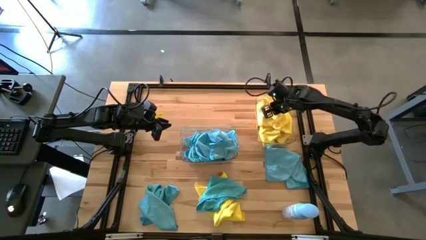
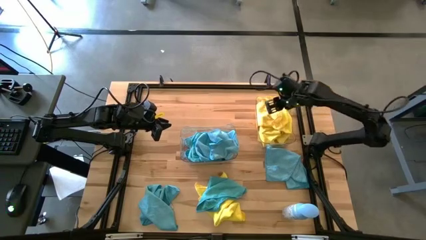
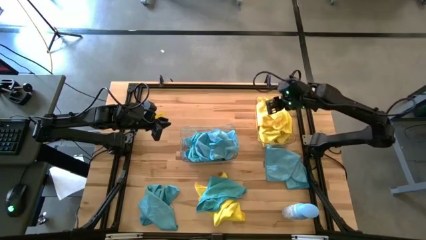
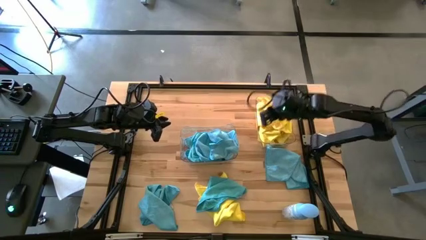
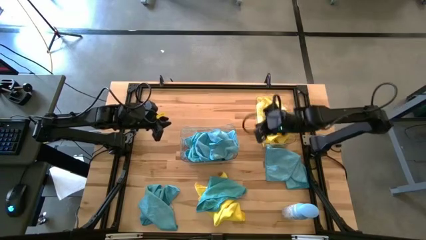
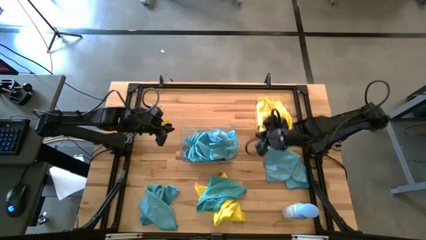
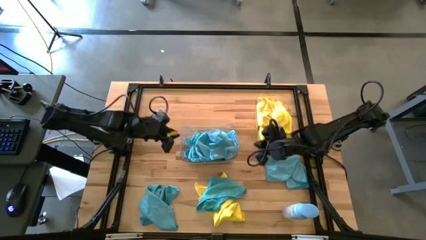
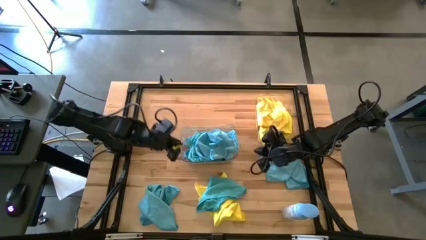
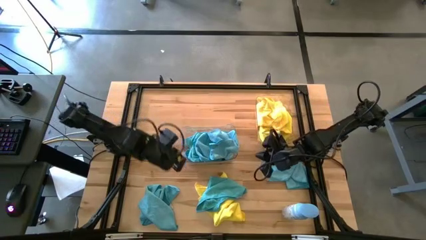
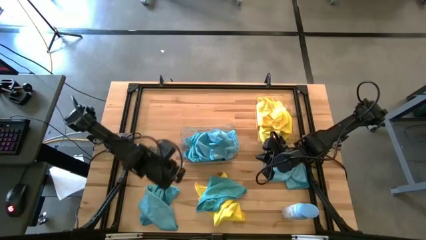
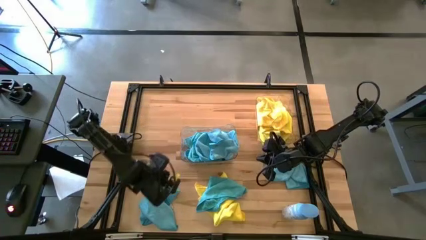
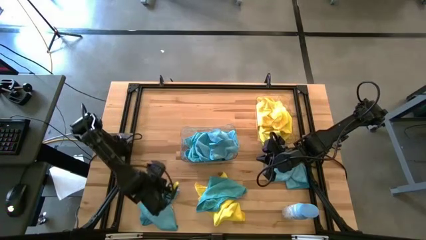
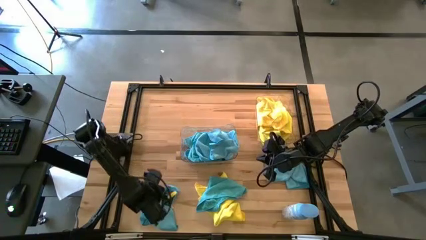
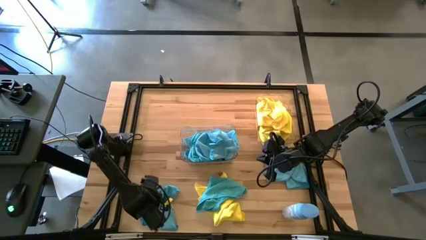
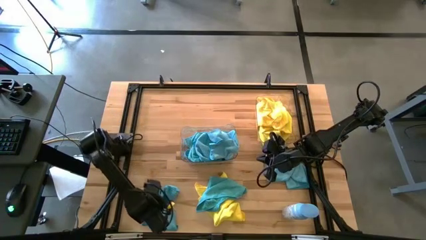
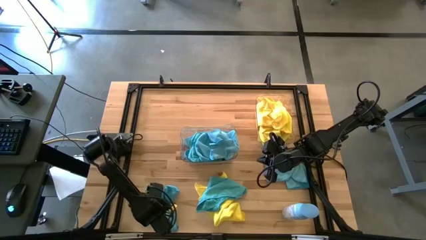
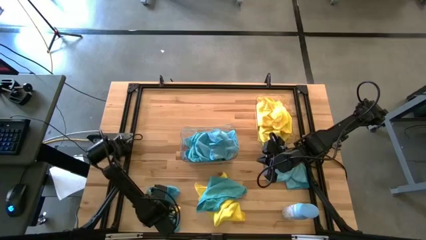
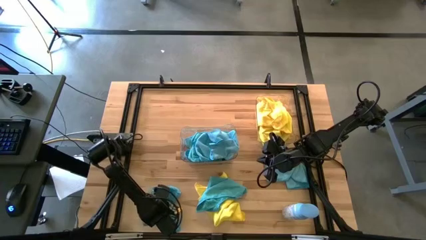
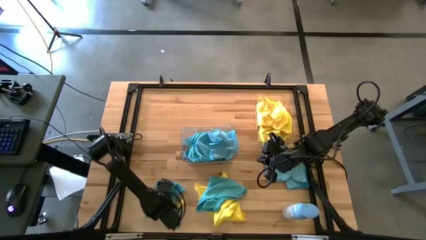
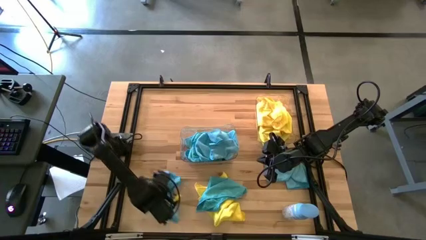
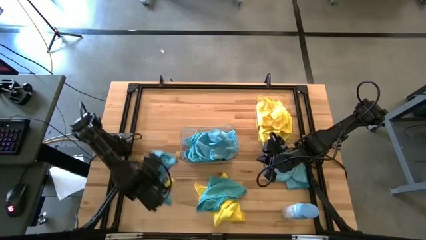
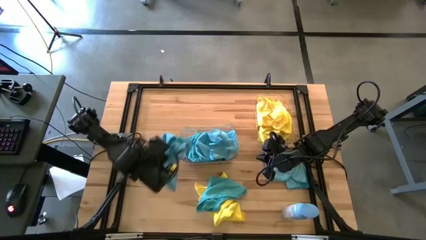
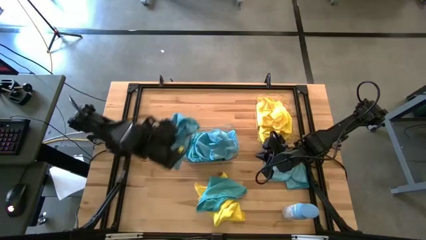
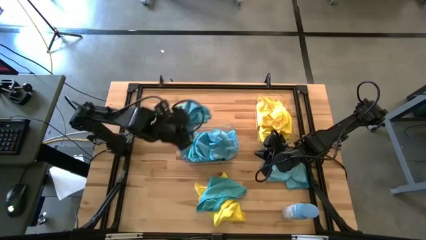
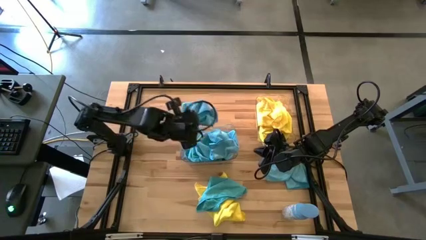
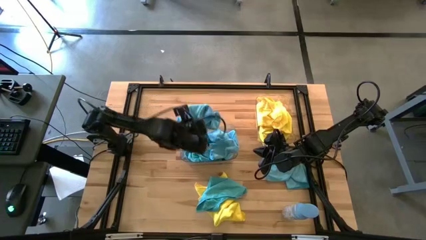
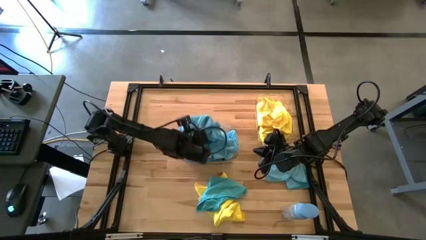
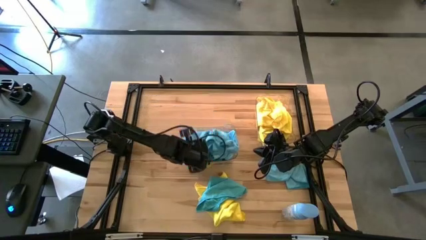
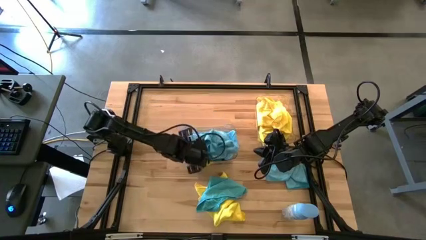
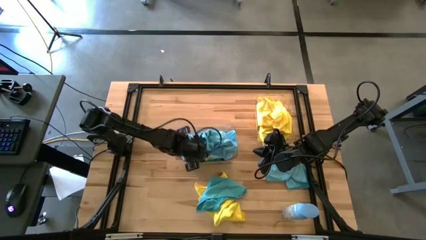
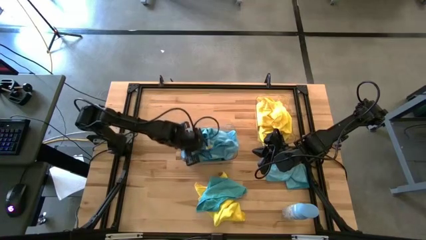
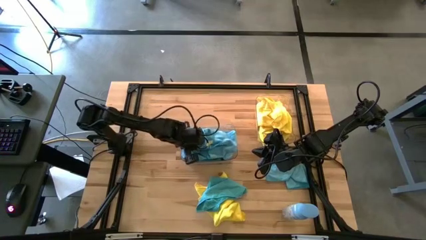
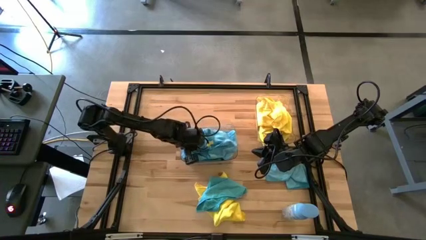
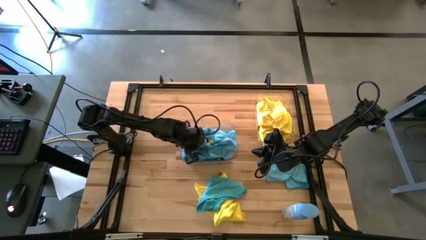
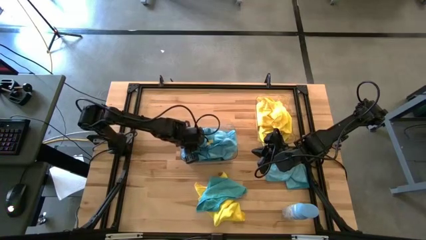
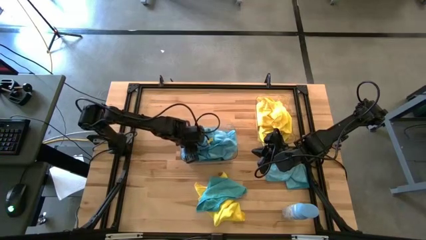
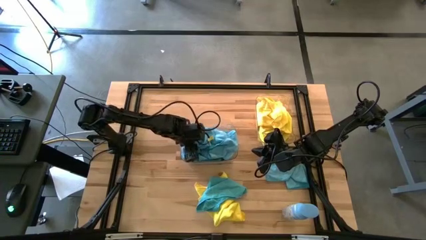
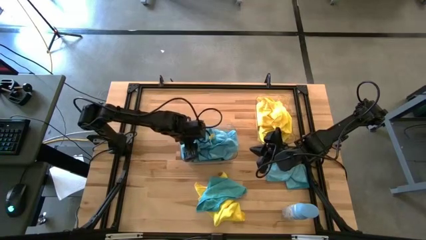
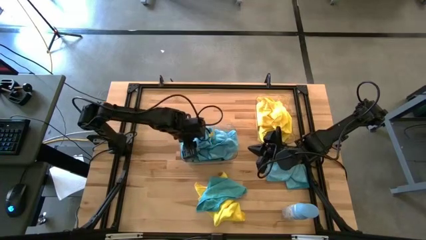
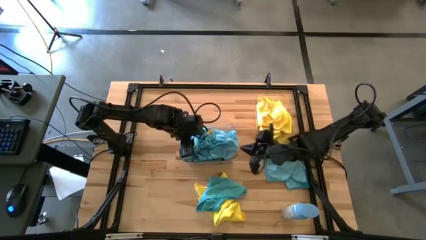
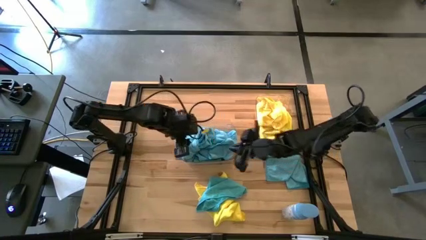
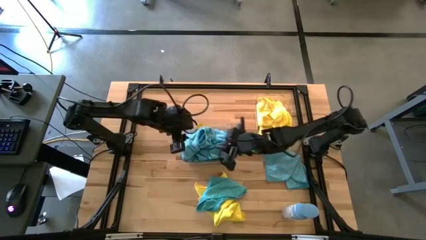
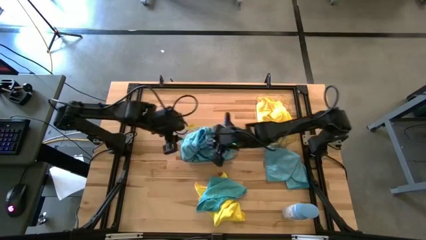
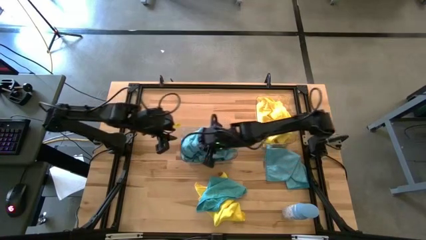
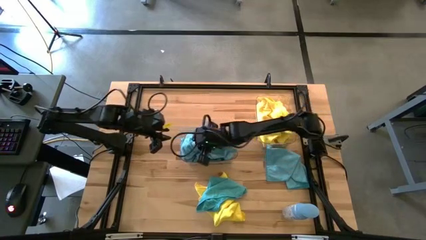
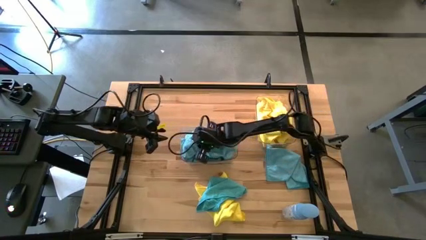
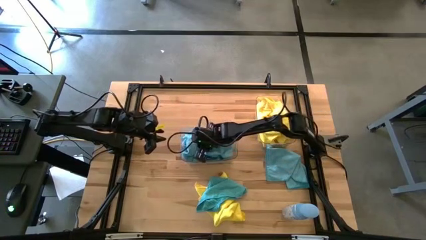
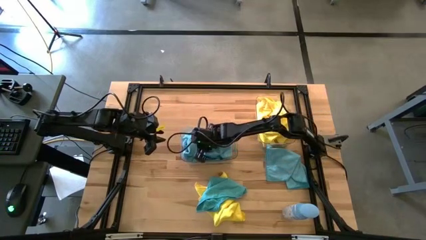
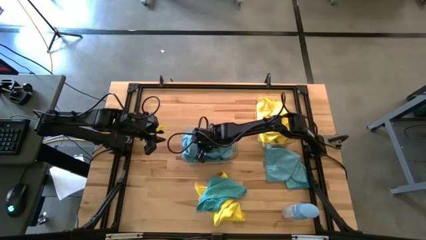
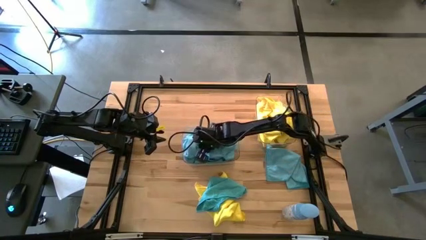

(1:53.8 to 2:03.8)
Task: Sort microfiber towel by color & place in baskets
Put the blue towel into the bottom transparent bin

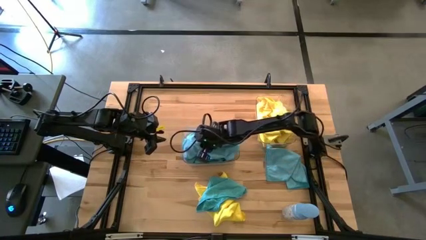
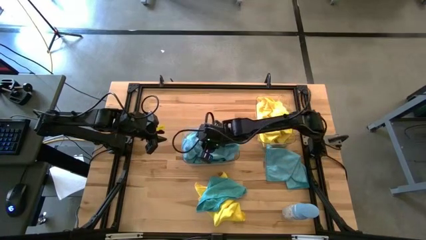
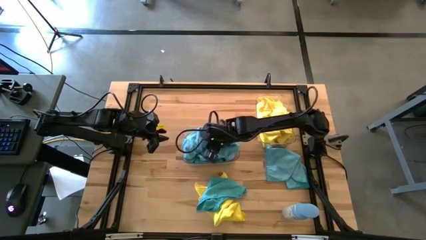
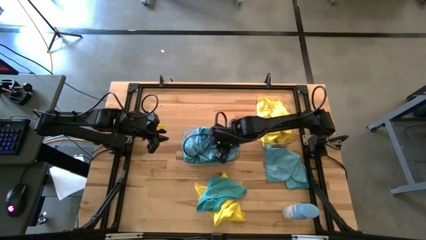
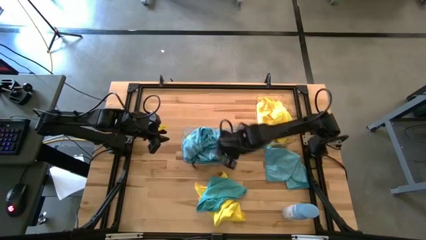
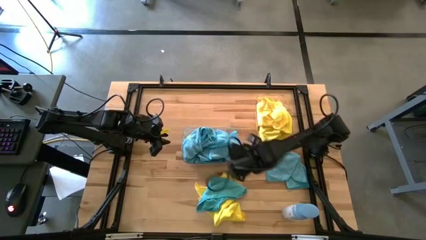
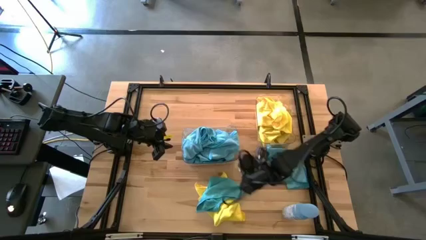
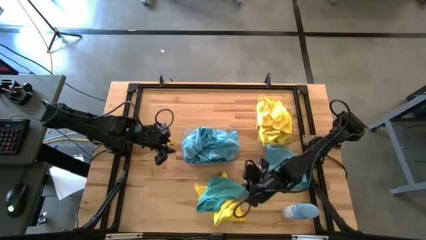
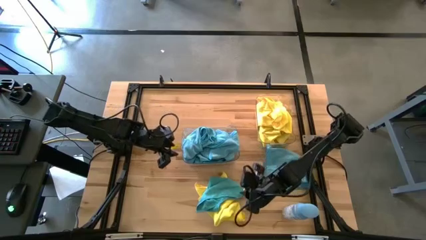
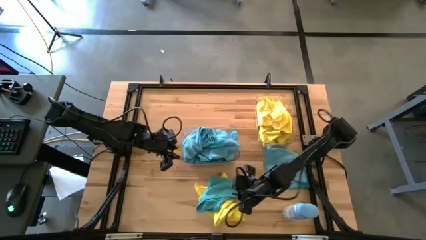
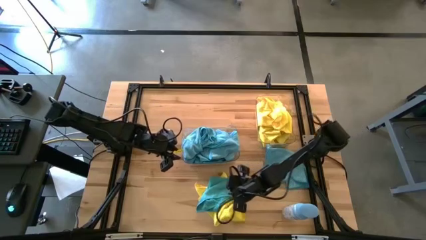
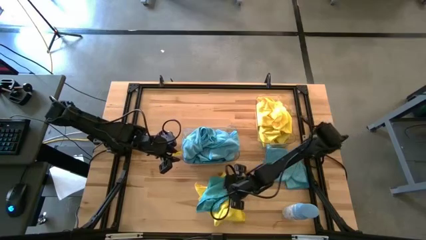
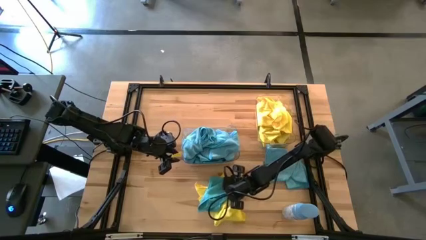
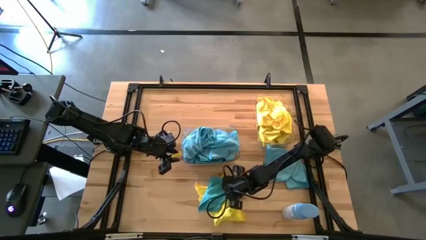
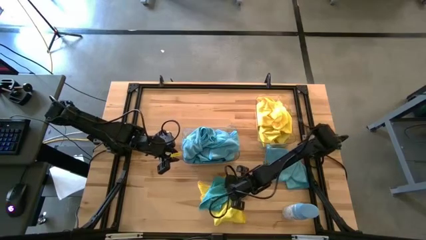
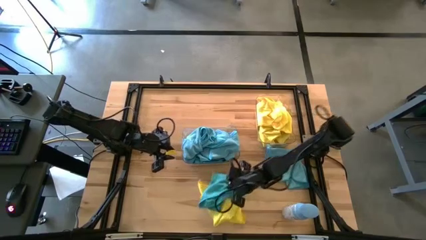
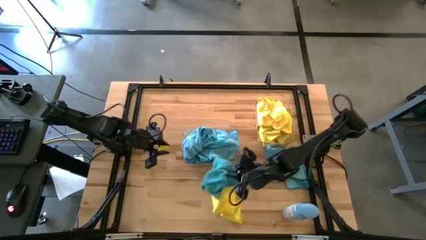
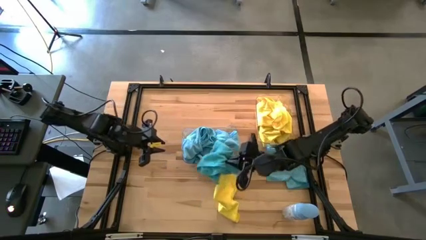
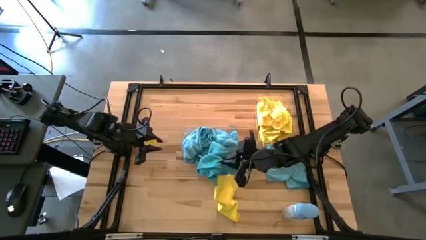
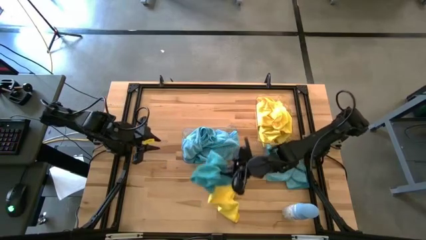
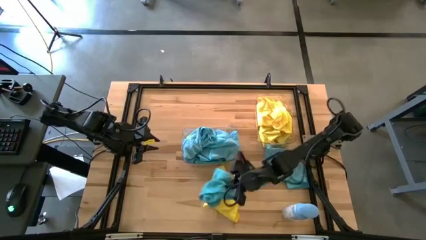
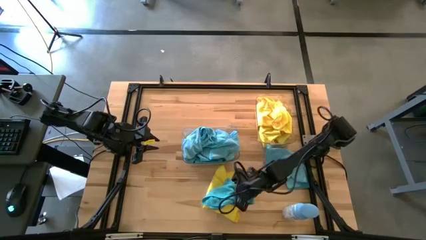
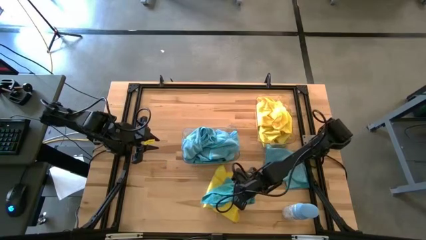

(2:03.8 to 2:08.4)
Put the blue towel into the bottom transparent bin

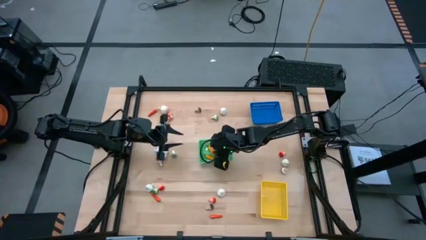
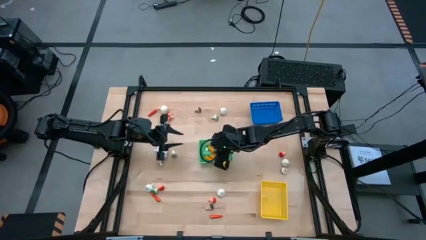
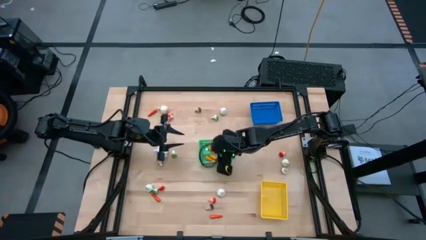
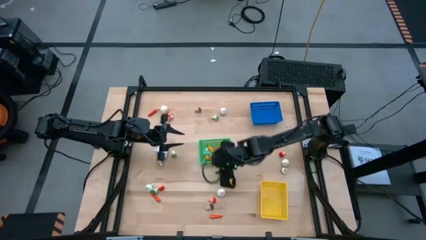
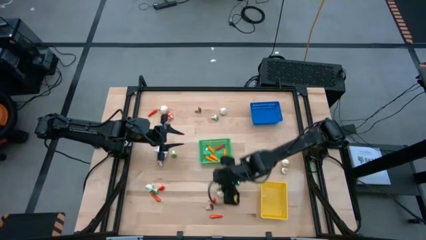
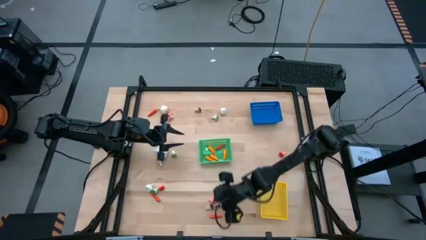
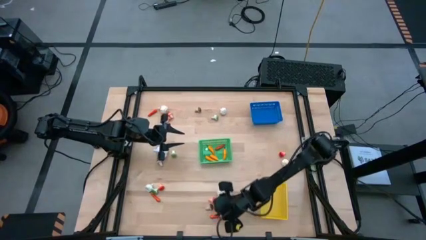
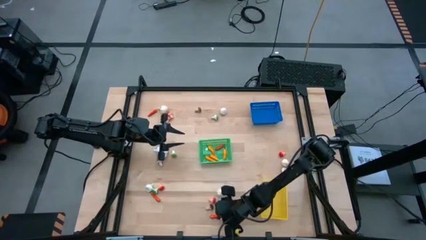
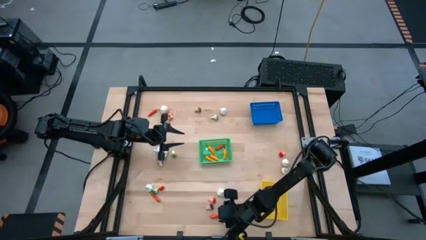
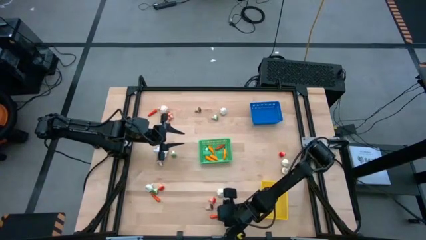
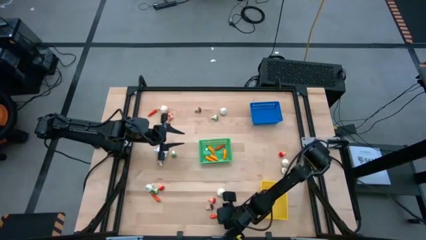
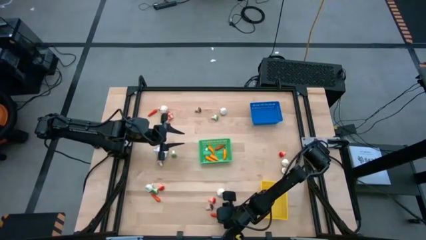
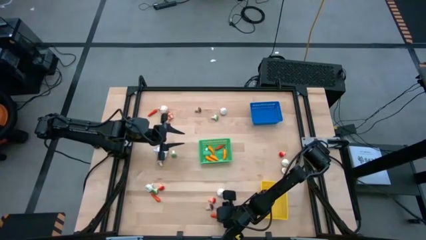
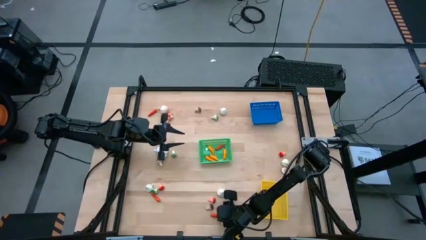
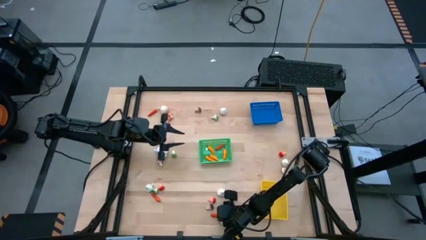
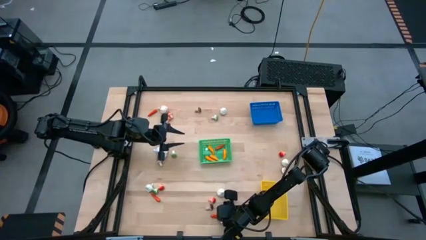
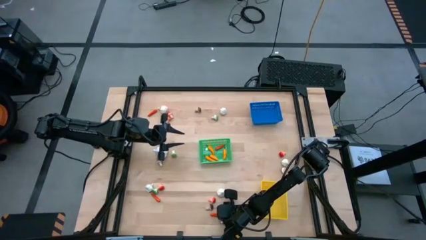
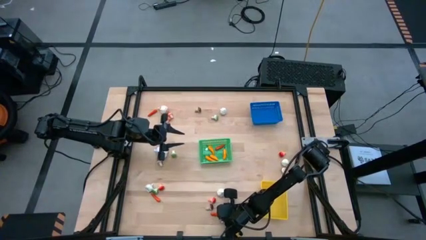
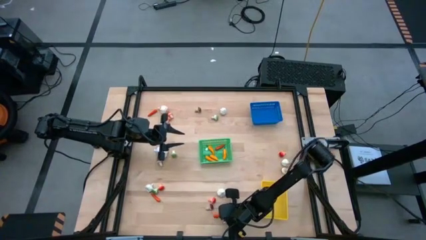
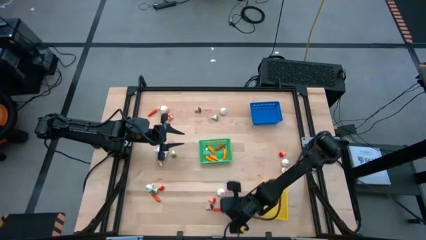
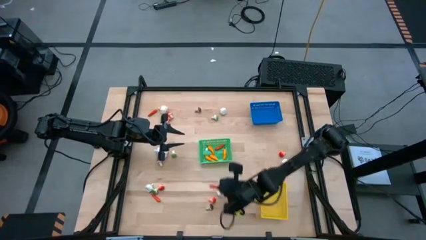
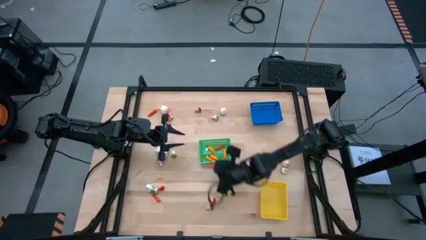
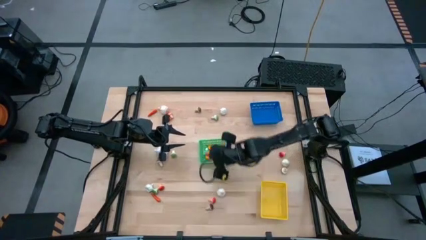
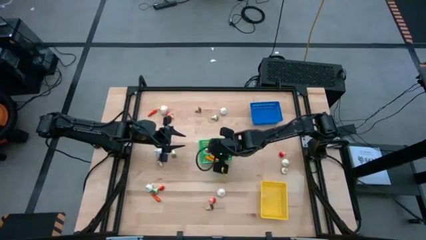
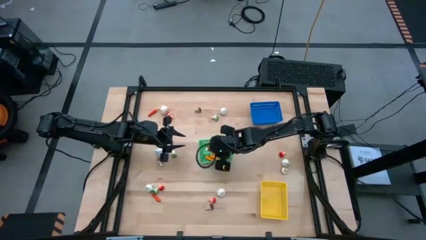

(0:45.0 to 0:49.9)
Task: Sort produce into baskets
Put the orange chili pepper into the green bin
